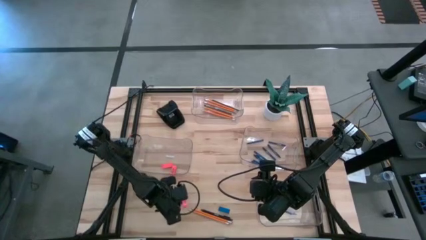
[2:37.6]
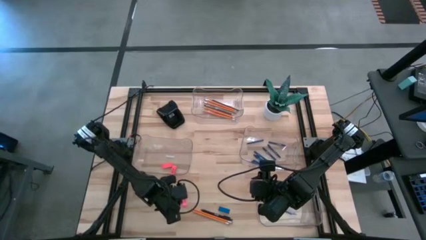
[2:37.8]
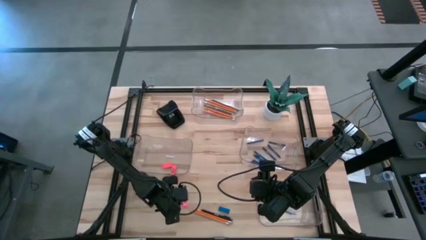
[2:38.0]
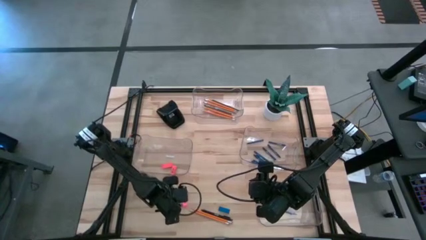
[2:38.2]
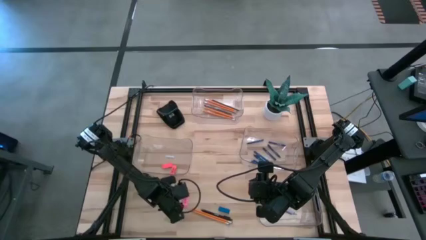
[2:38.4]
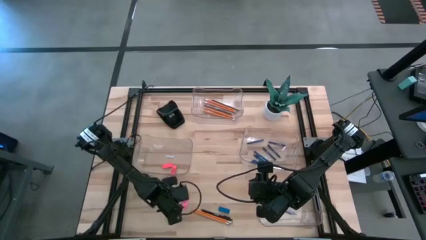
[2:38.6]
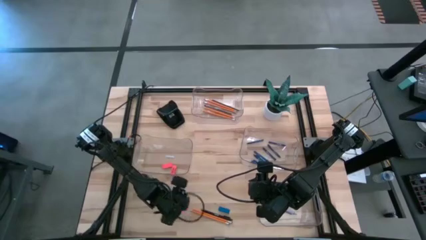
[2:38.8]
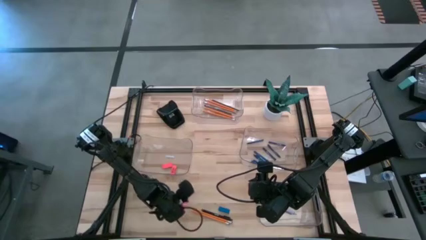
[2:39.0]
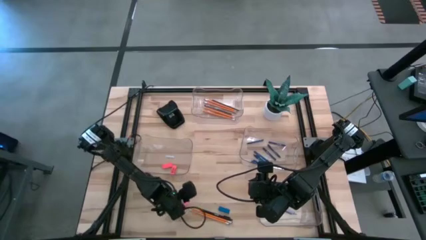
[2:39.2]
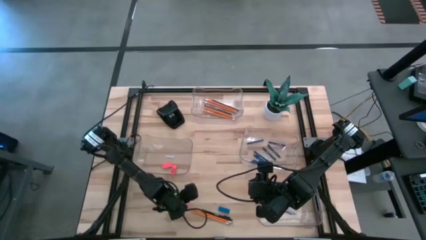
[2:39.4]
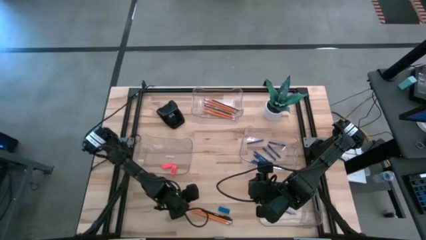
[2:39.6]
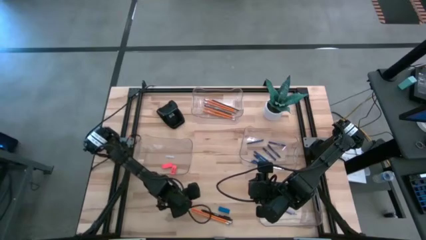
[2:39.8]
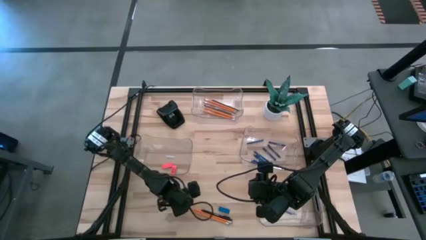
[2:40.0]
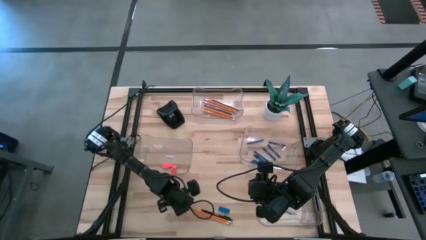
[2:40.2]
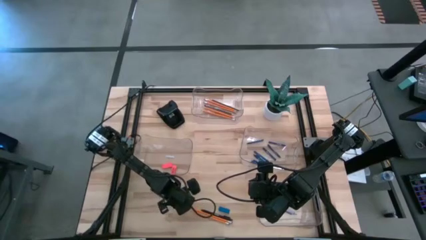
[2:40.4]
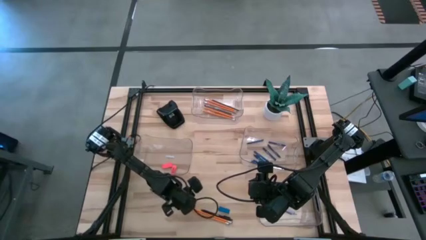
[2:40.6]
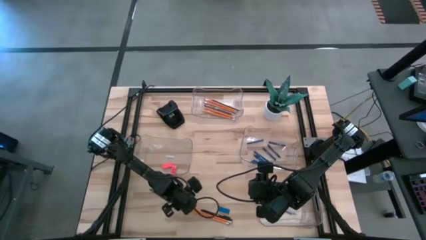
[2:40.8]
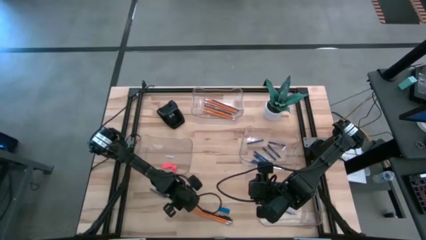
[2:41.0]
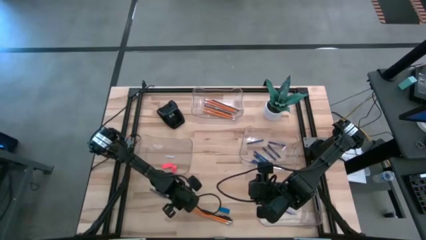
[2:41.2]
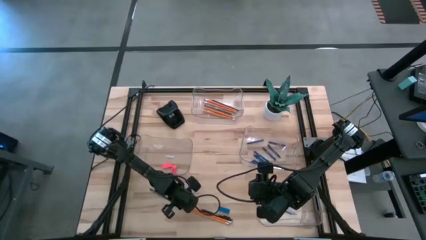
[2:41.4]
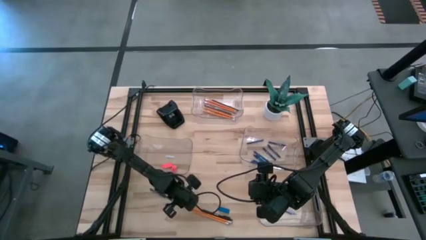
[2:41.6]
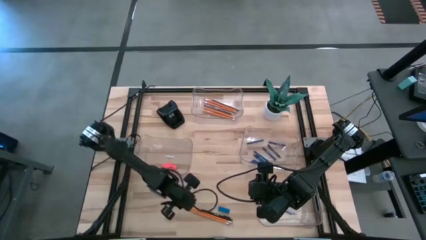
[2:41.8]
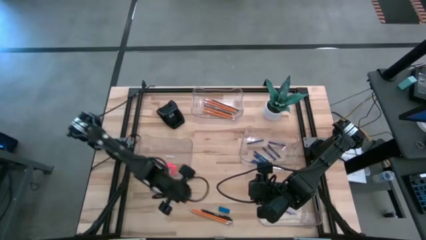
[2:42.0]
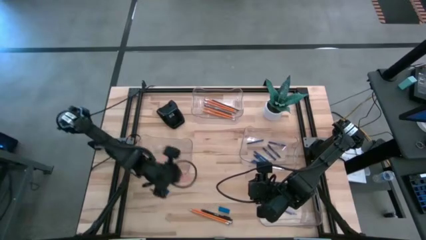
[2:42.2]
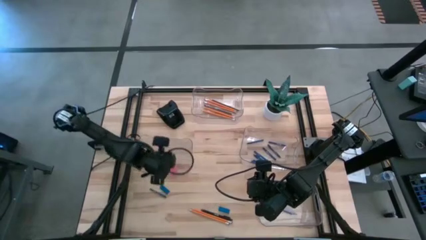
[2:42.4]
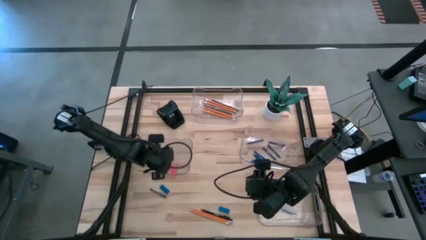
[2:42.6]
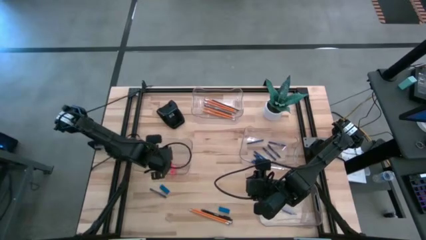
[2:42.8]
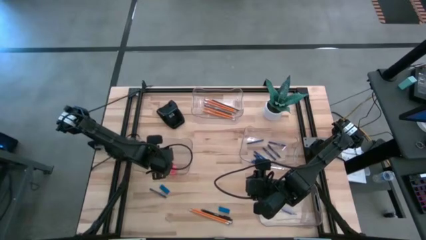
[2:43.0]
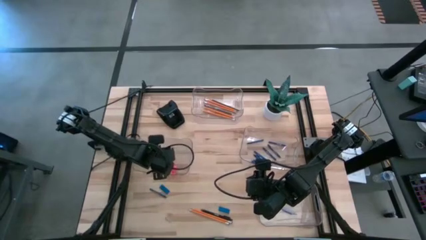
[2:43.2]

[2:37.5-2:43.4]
Task: Sort crayons/erasers/pens/pencils in bins
Put the pink eraser into the middle left transparent bin

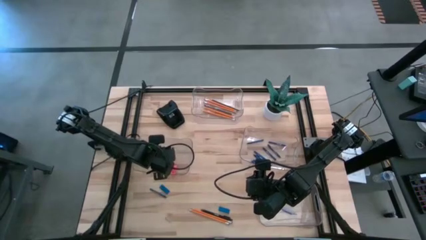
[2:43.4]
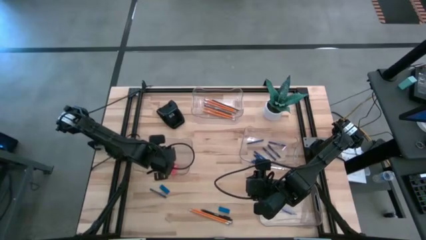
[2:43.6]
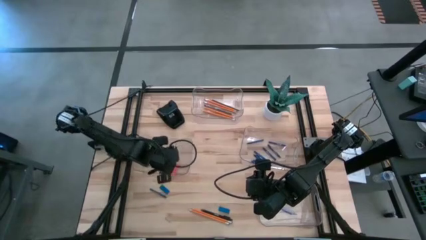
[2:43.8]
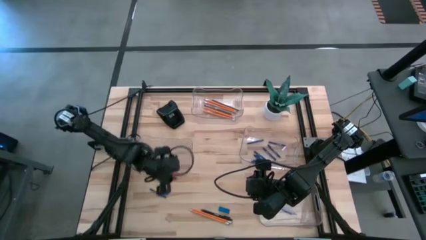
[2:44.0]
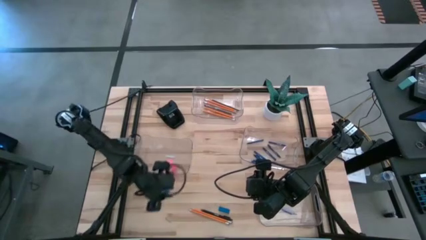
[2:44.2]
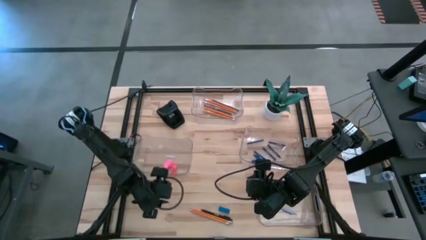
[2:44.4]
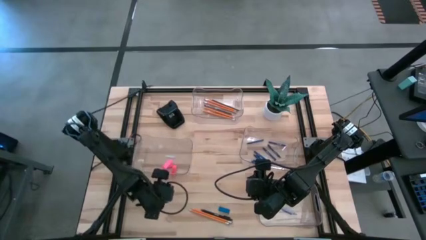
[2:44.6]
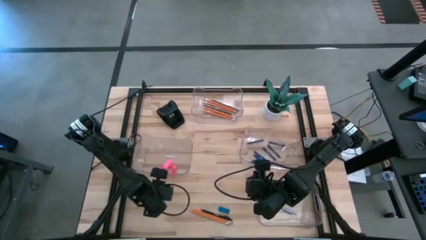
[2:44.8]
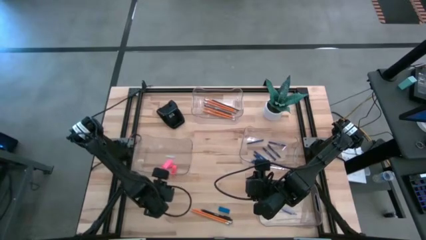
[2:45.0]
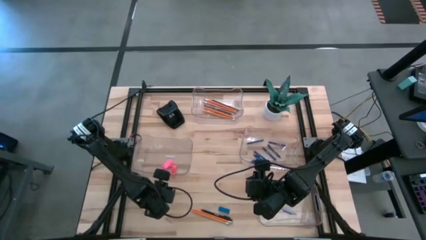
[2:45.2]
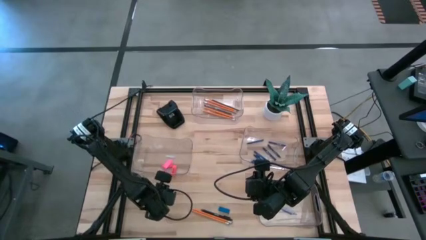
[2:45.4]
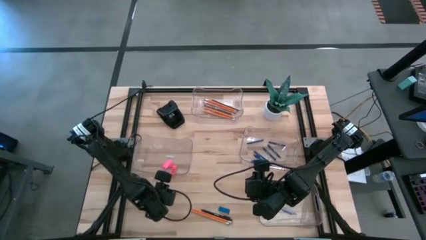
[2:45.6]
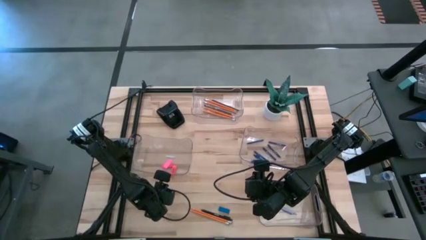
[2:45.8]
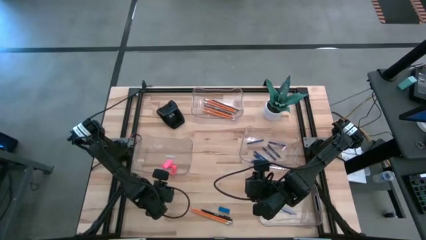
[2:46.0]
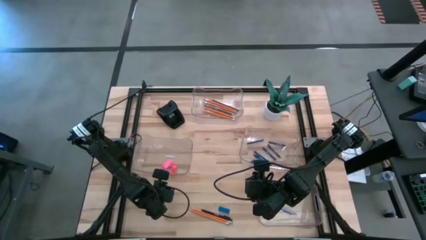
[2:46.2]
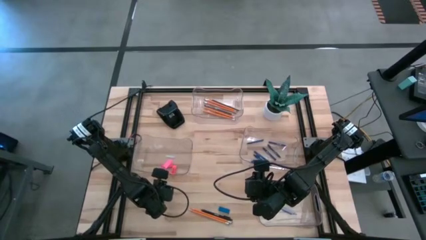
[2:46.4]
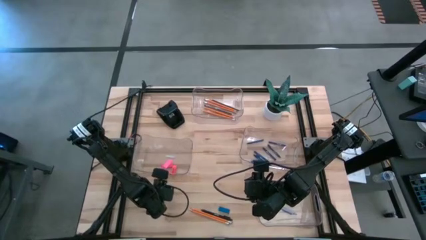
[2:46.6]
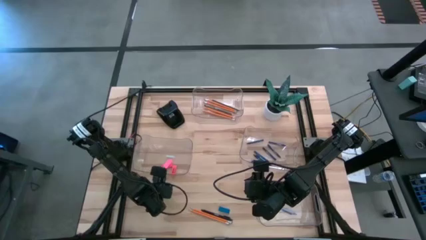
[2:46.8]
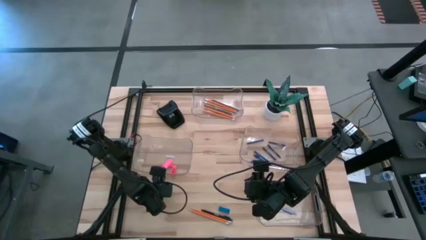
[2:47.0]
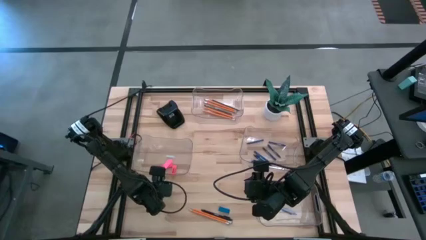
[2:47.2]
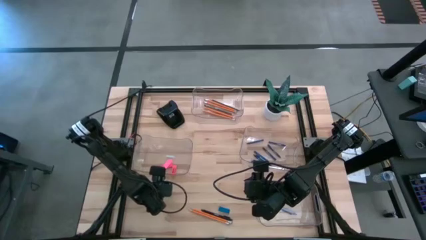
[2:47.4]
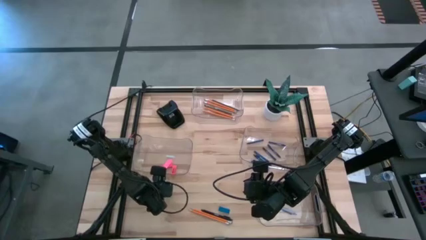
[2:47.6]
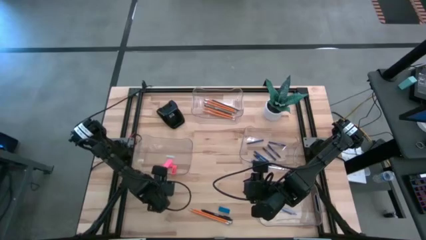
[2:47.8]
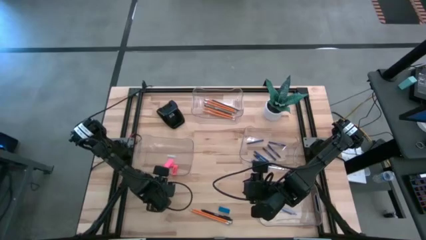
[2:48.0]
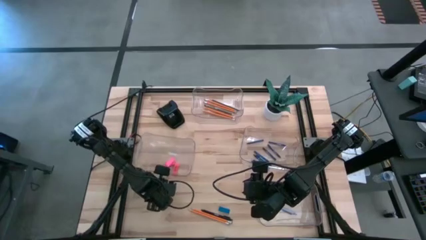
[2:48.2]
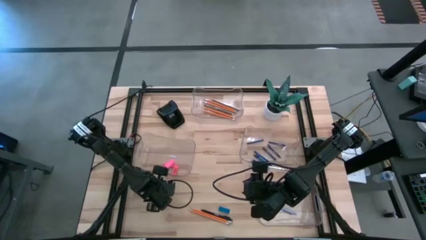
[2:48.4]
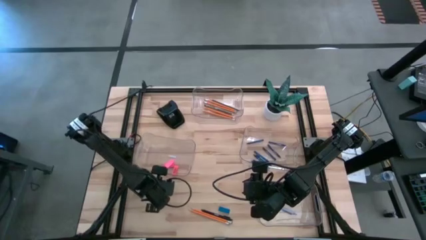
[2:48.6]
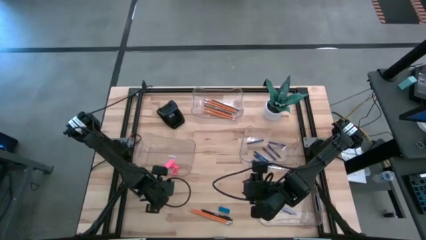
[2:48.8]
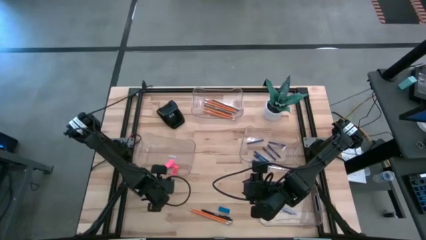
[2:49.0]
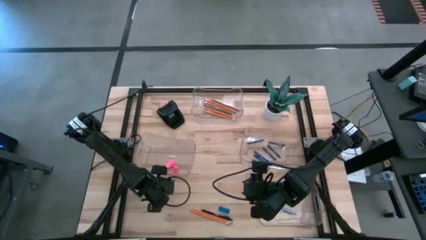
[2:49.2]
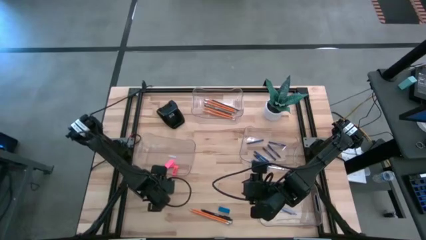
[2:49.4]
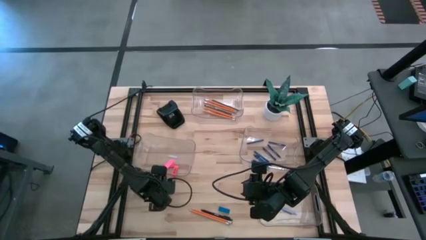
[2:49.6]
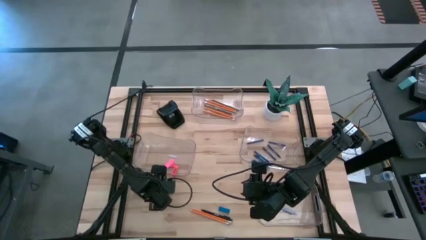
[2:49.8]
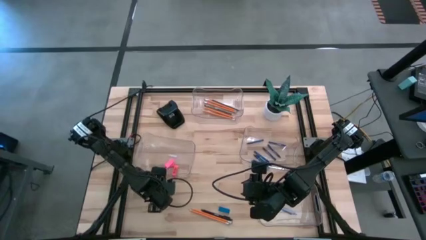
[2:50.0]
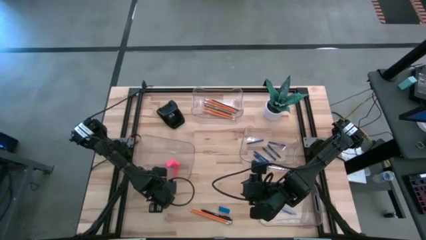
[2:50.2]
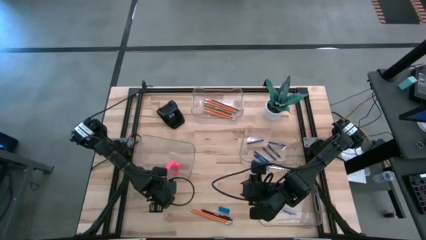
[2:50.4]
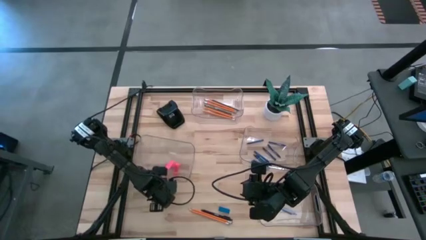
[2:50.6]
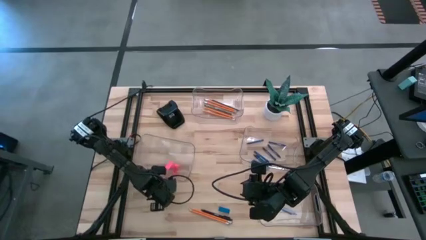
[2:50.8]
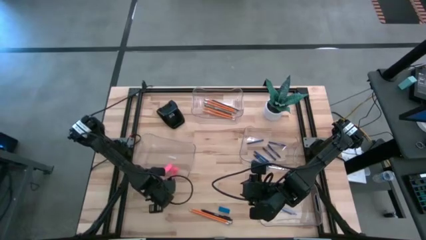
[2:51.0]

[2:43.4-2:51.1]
Put the blue eraser into the middle left transparent bin

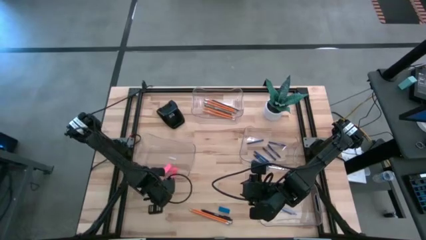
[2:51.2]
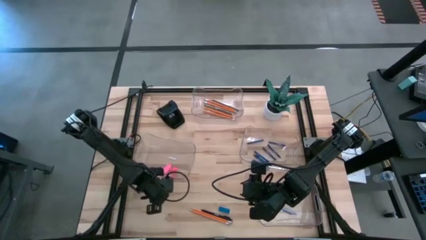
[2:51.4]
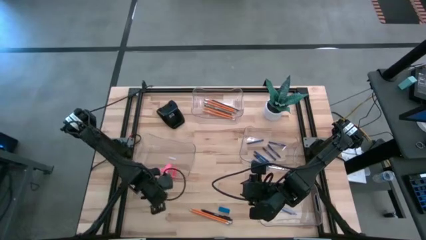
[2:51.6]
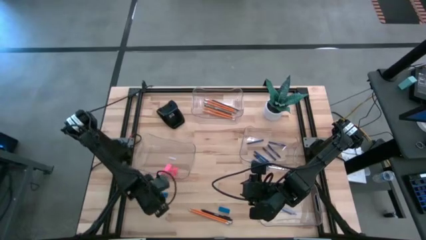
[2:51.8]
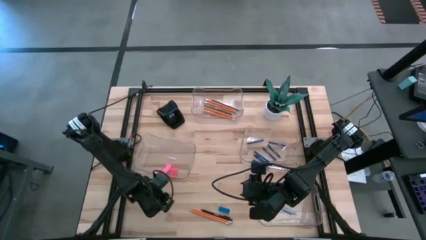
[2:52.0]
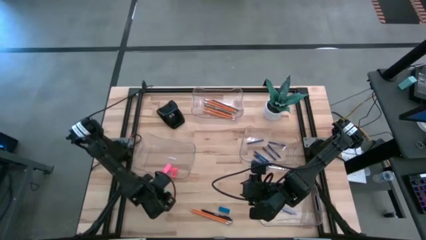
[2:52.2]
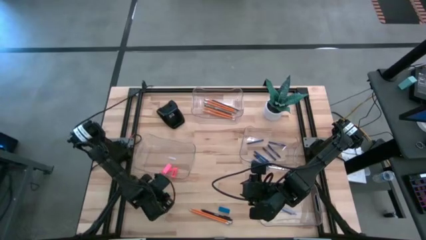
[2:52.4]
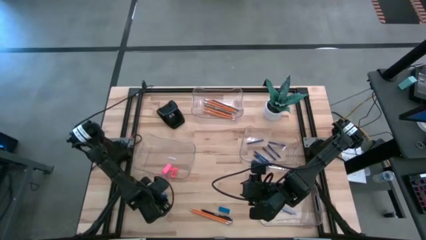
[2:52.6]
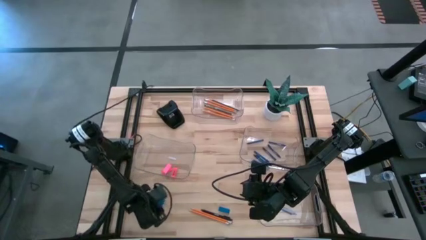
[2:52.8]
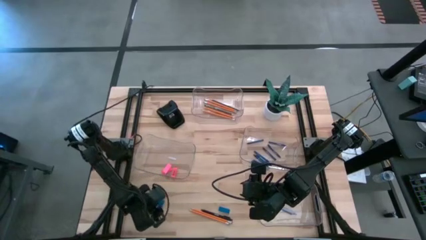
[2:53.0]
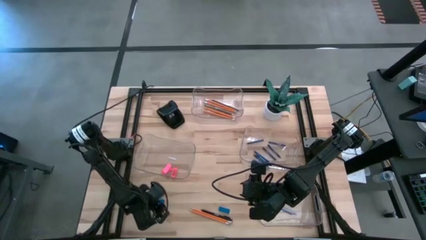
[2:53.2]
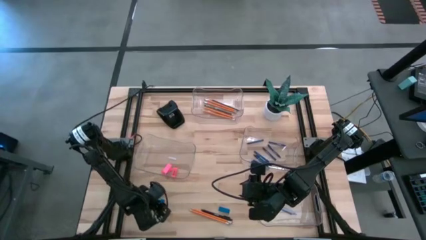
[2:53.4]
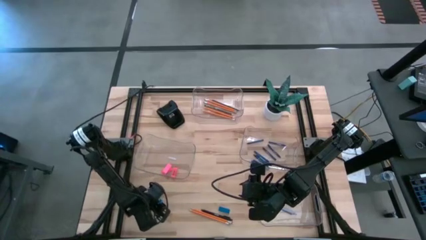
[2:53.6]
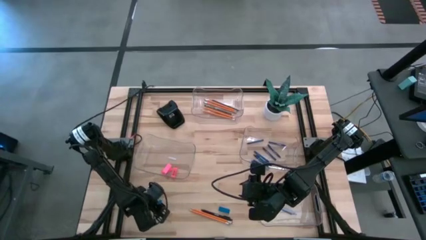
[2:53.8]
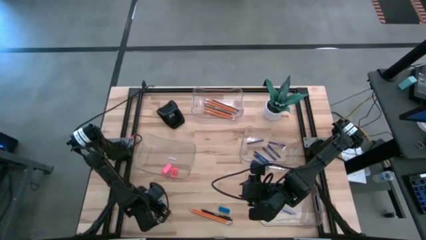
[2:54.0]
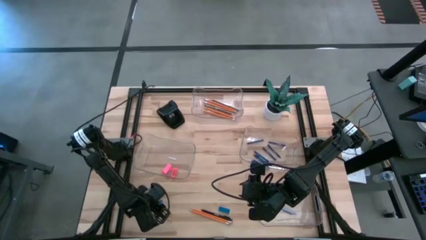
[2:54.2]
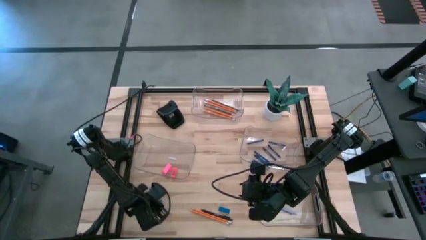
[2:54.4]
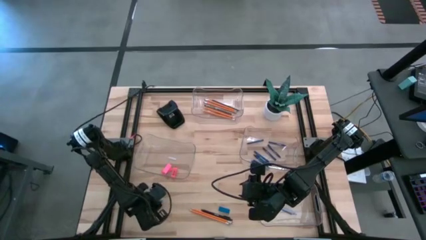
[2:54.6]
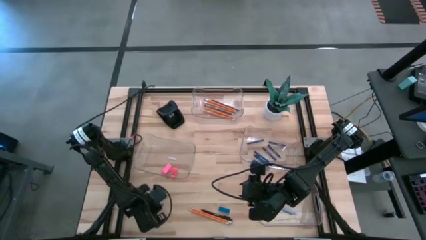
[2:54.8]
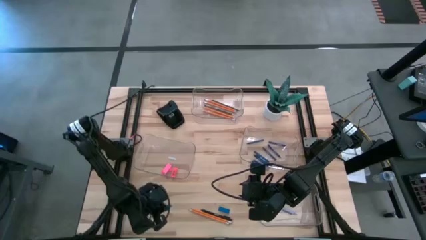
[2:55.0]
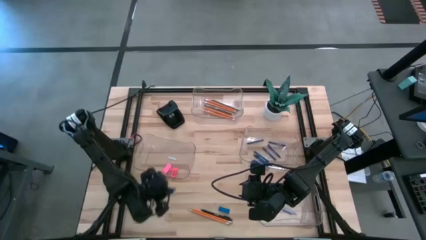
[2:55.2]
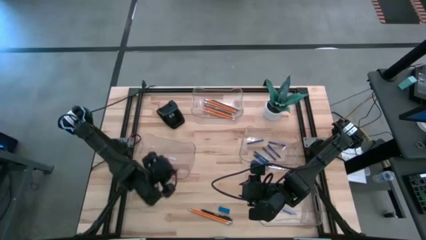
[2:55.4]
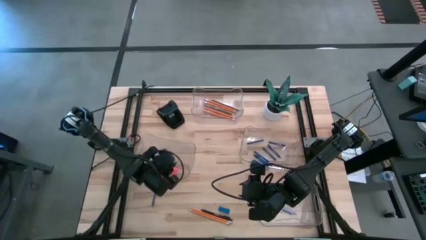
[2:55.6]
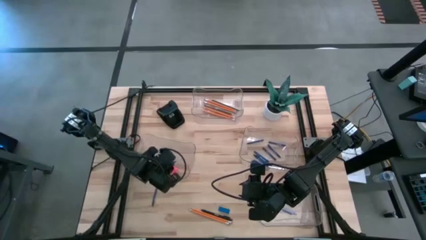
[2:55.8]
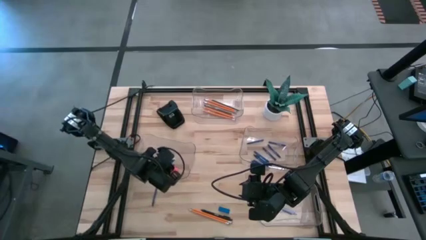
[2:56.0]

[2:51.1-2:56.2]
Put the blue eraser into the middle left transparent bin
